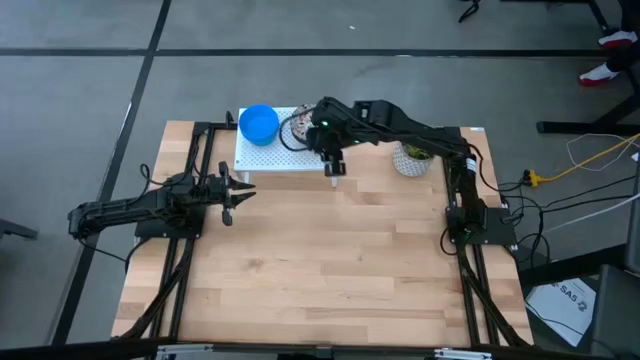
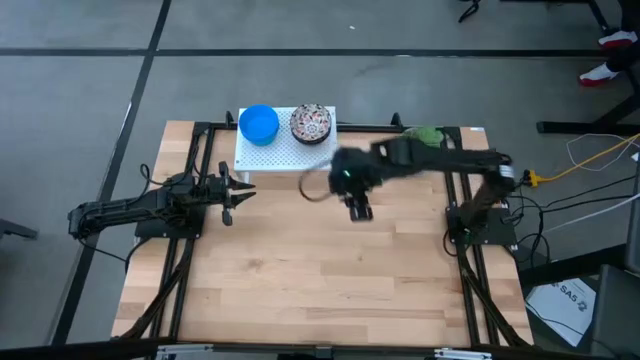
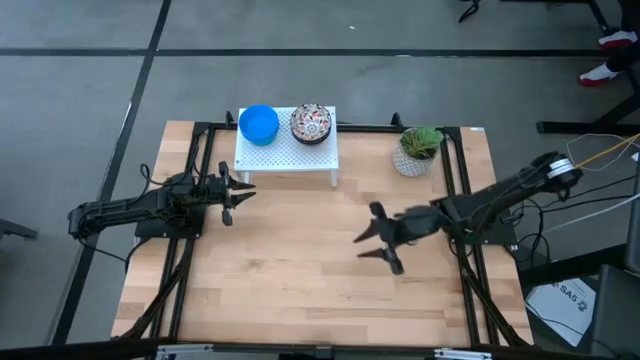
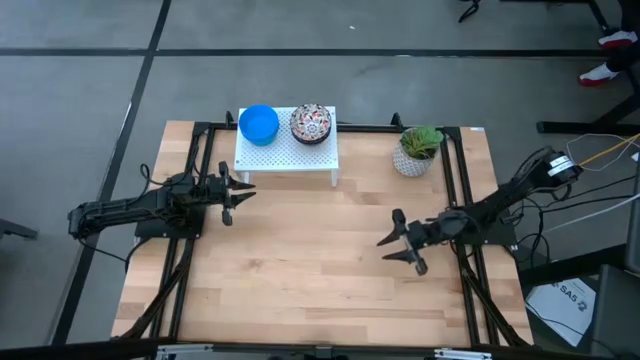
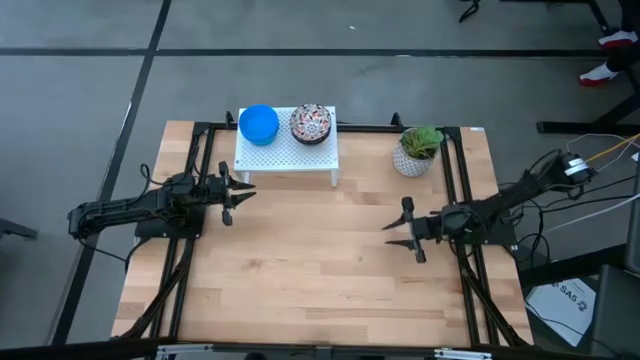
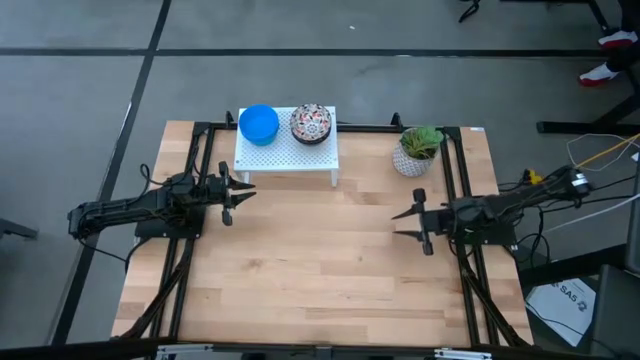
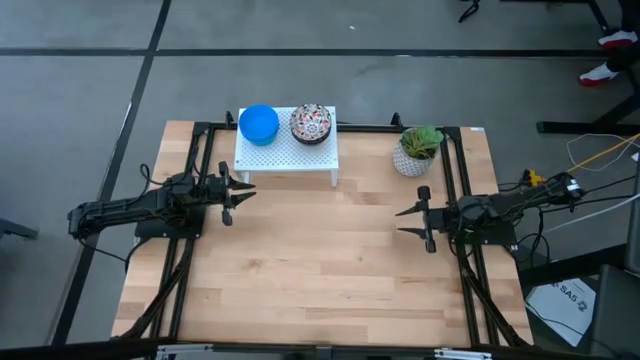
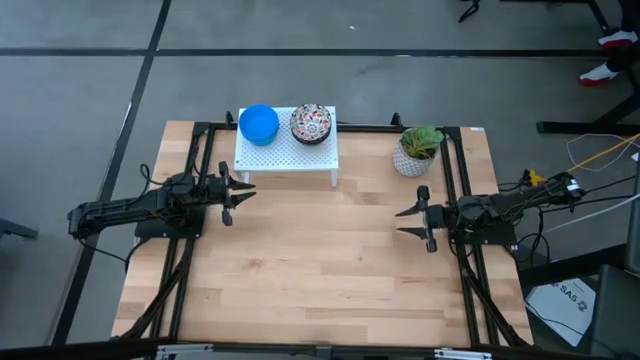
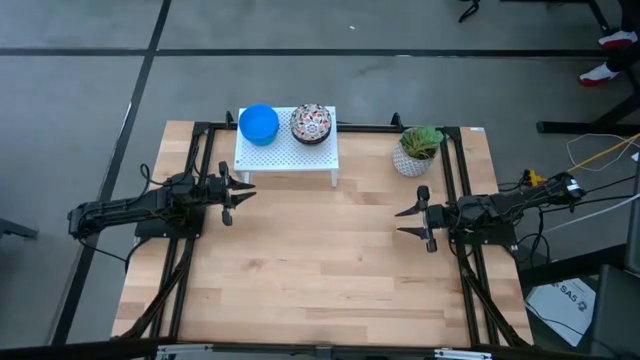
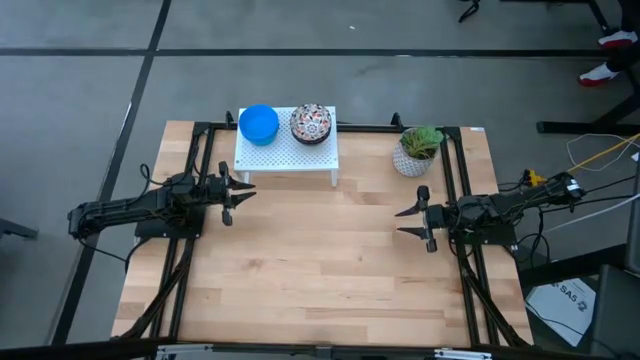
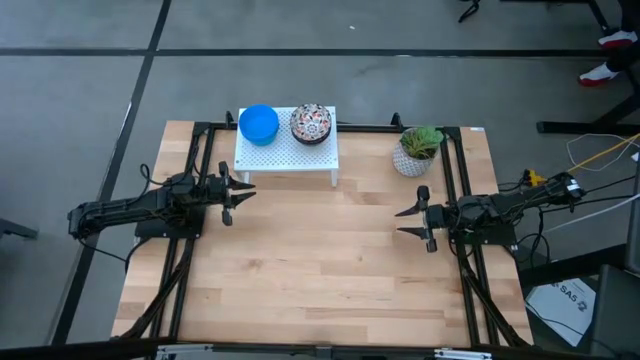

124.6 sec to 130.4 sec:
Task: Pick & Place Mini bowls
Return to Home Position

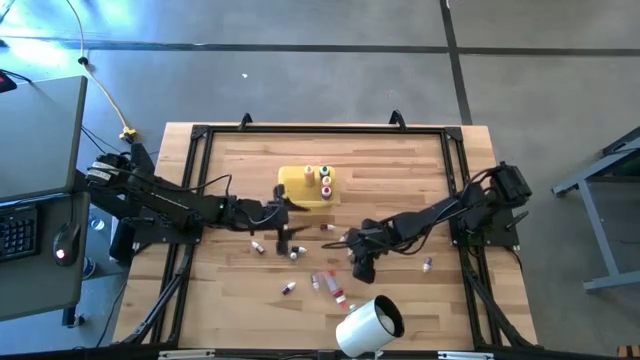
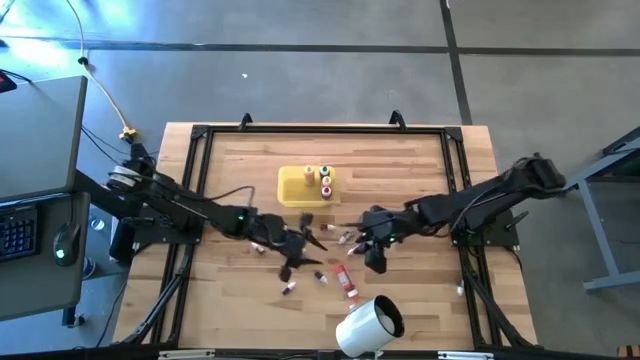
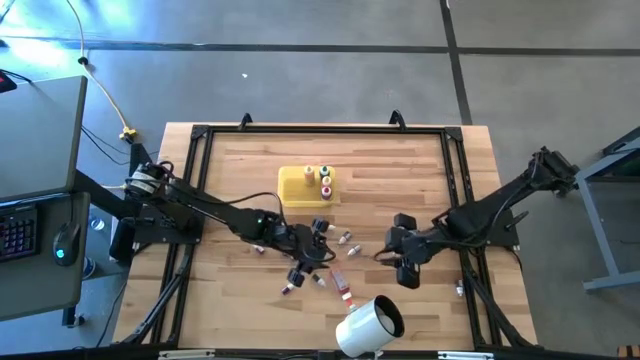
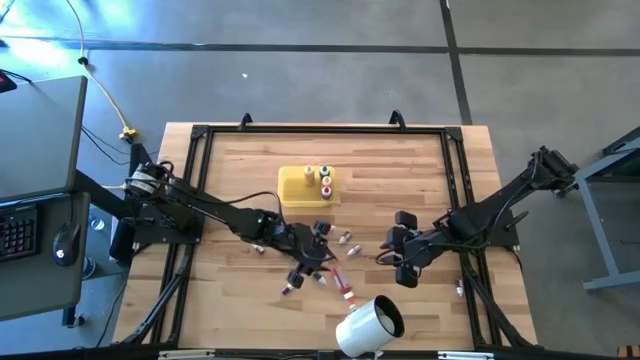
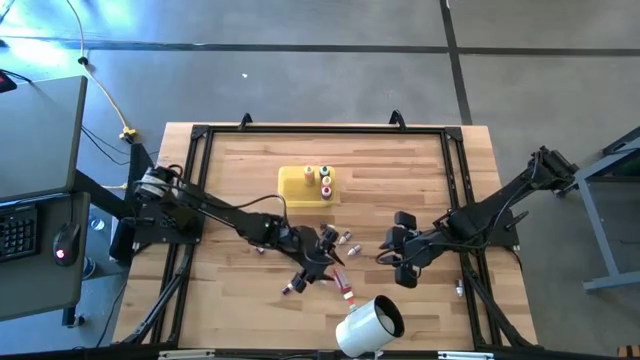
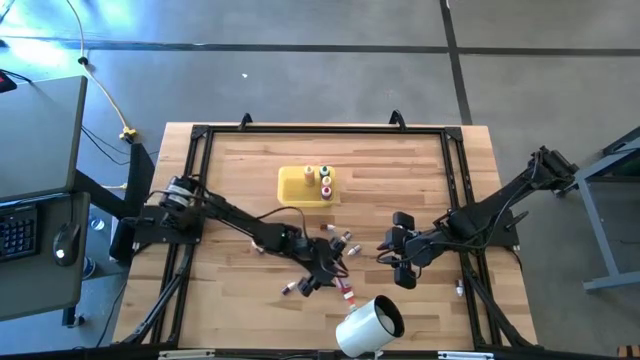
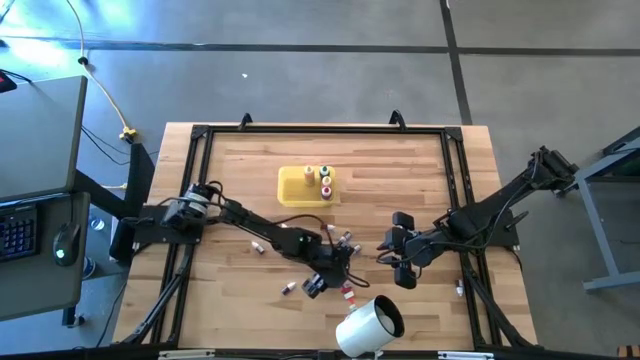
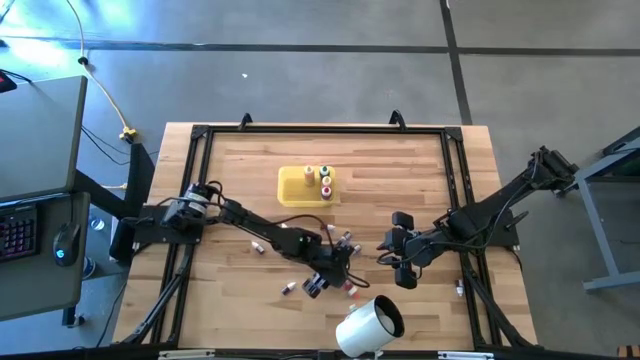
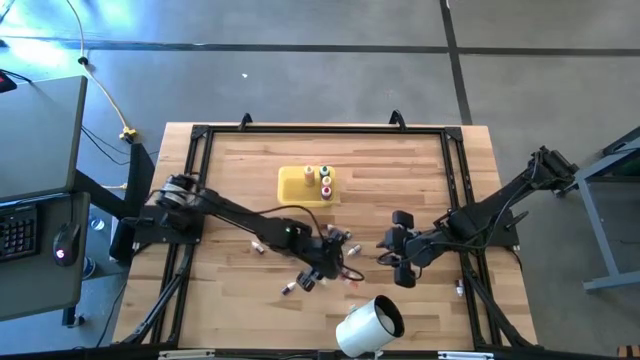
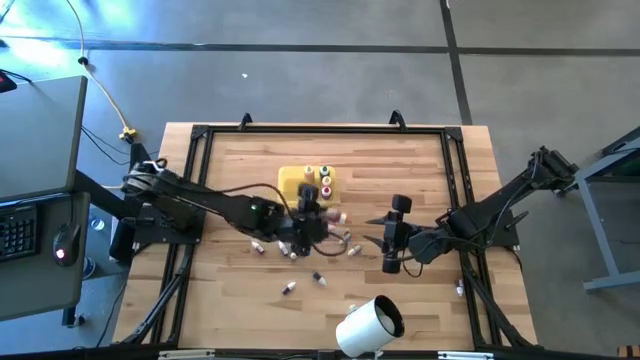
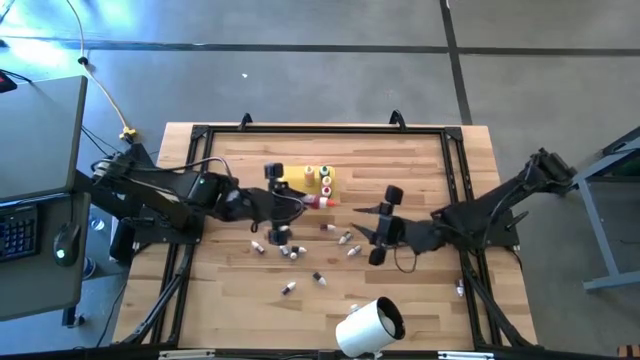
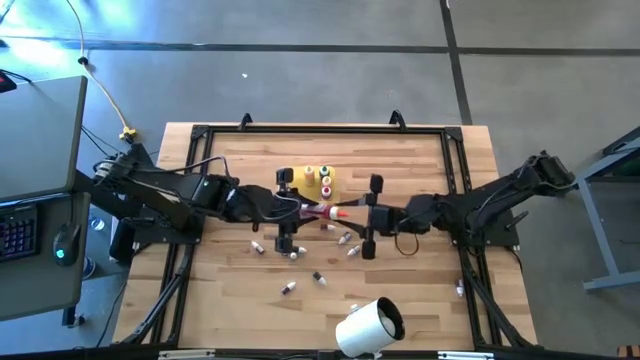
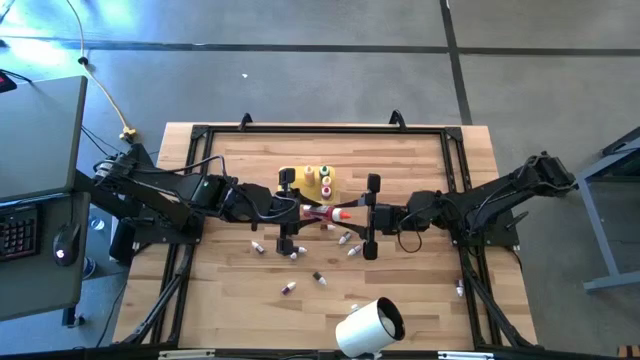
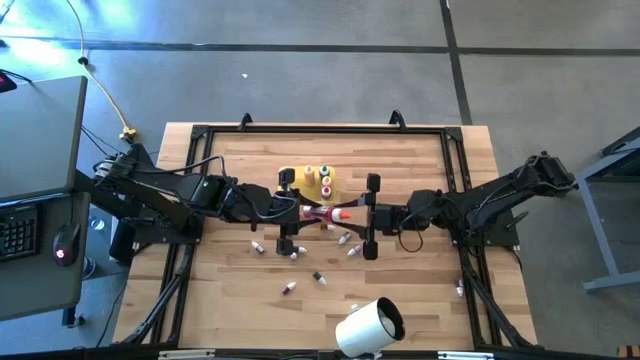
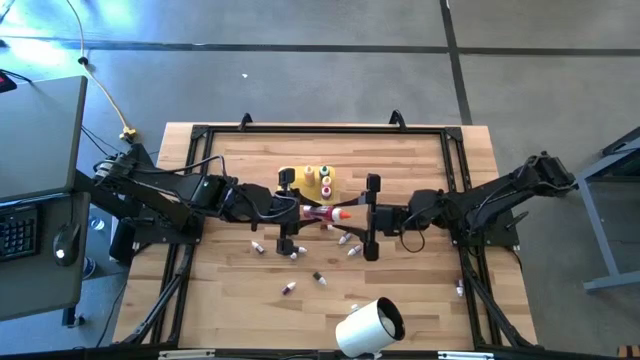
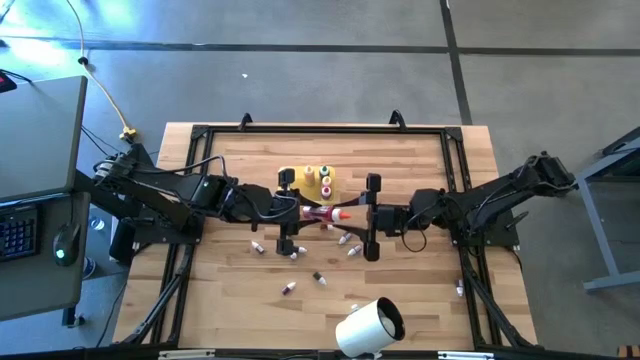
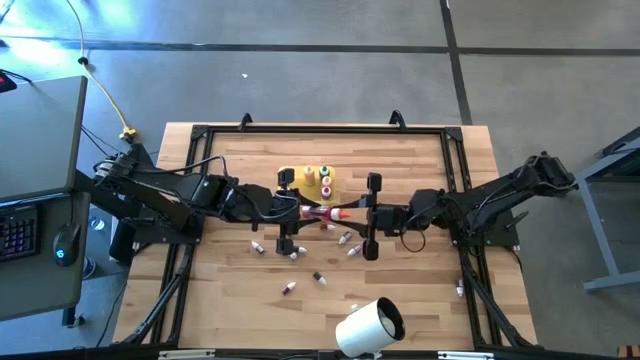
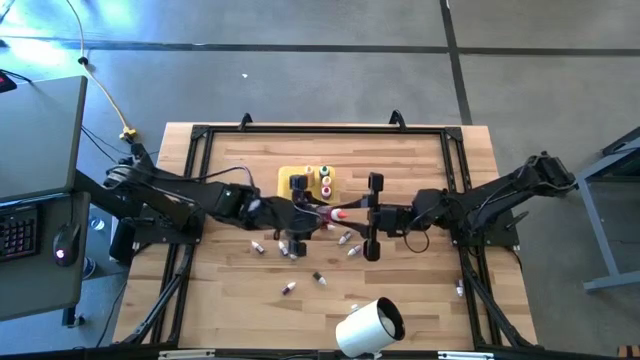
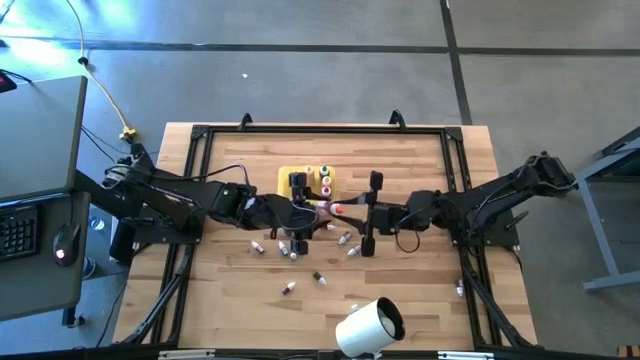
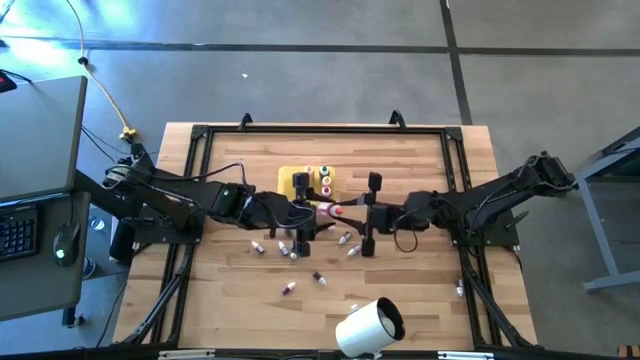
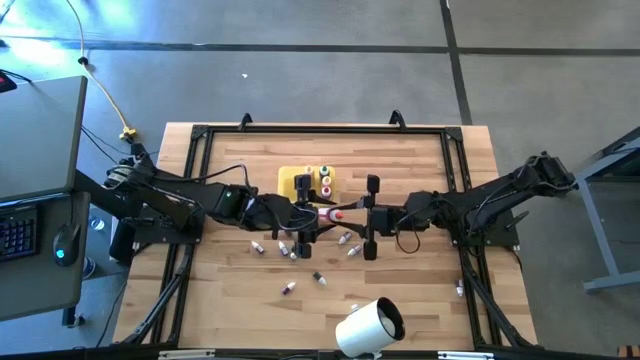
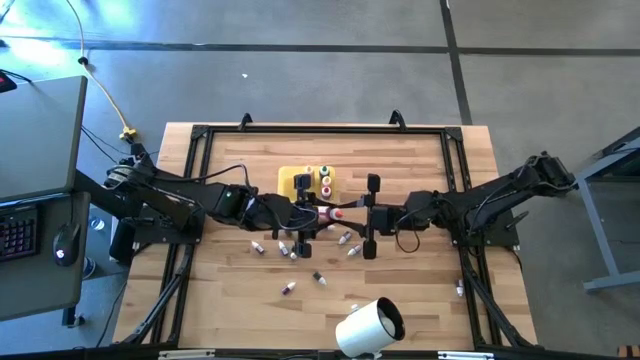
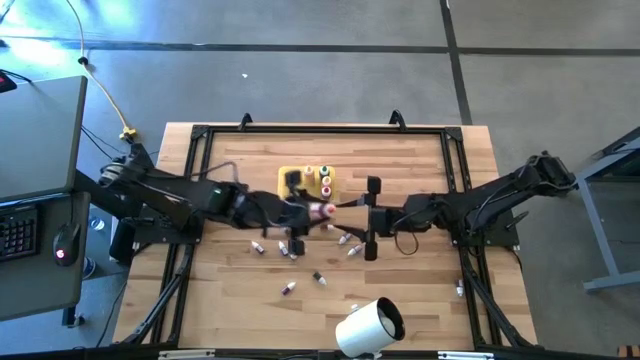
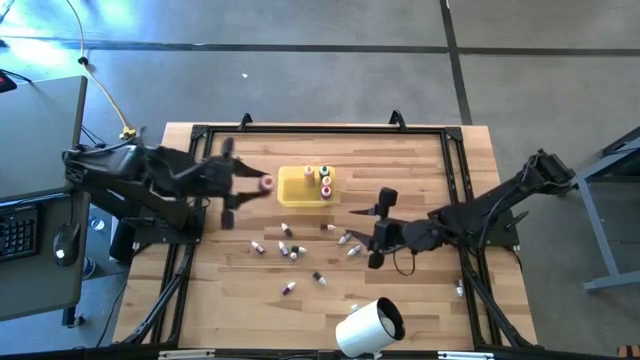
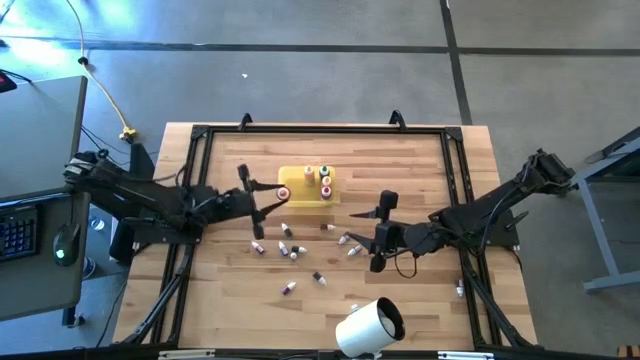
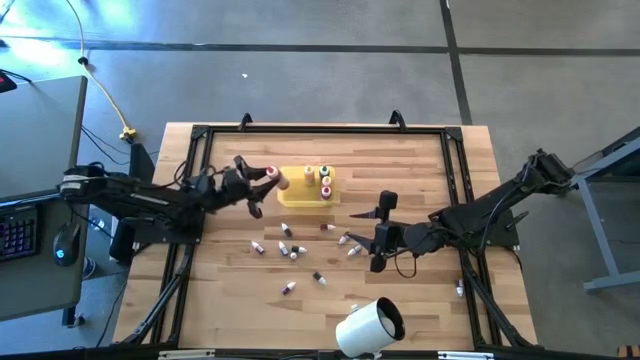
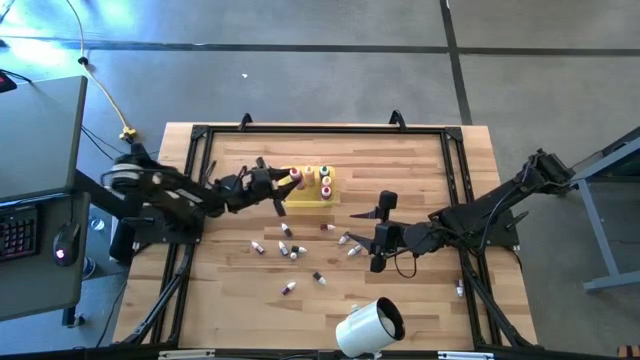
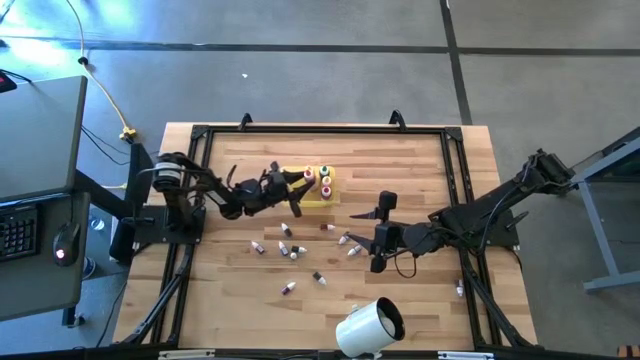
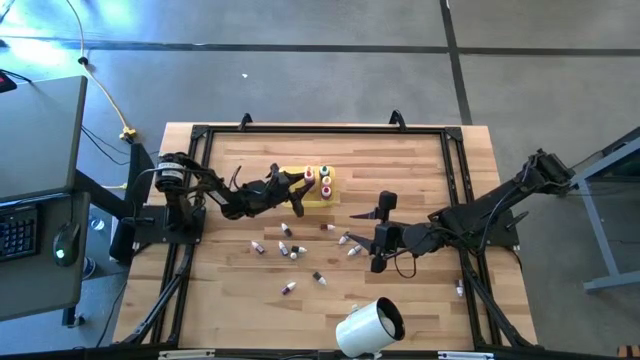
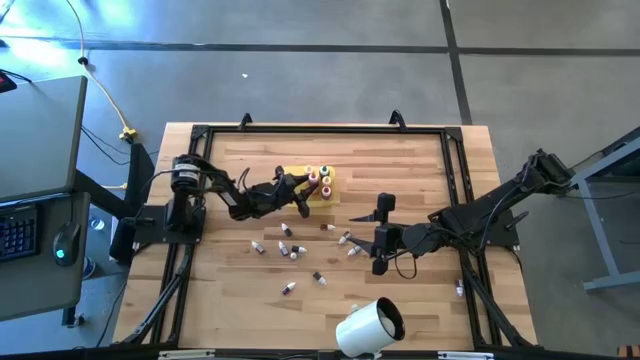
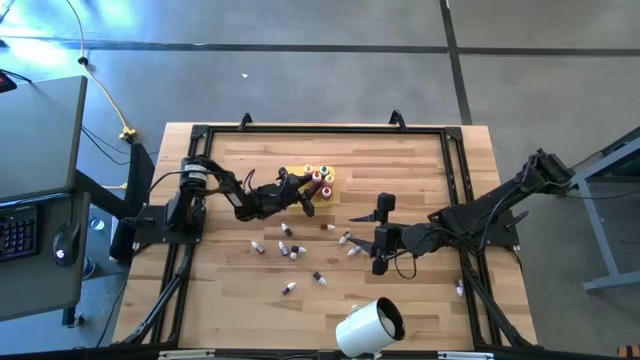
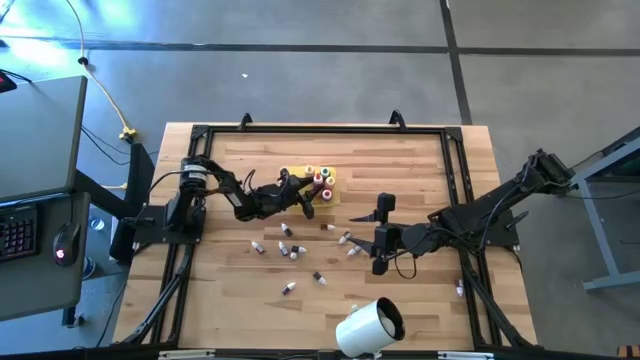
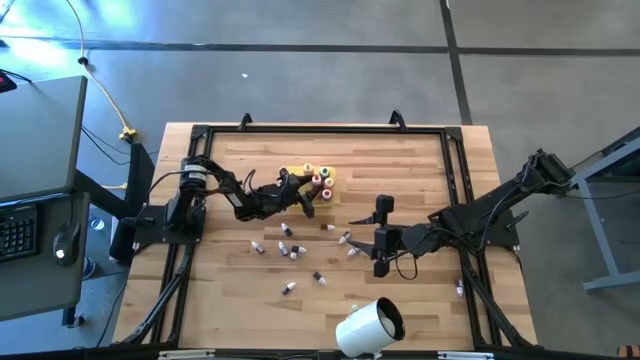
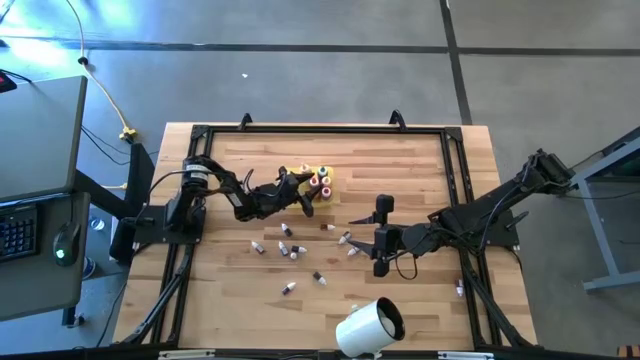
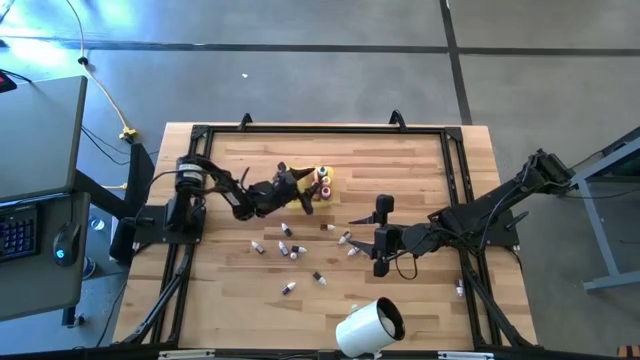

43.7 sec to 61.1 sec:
Task: Pick & Place food coloring
Put the large orange food coloring bottle into the yellow container
